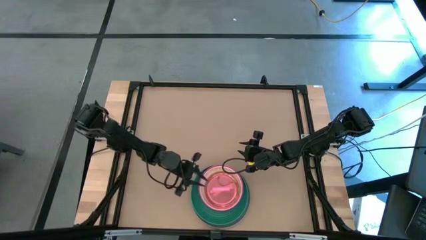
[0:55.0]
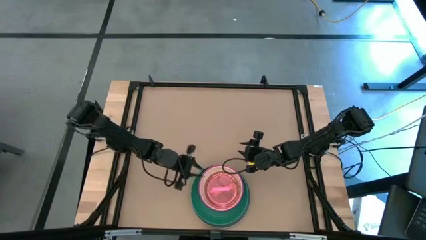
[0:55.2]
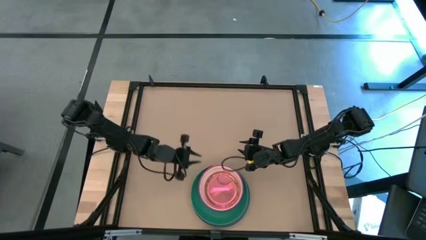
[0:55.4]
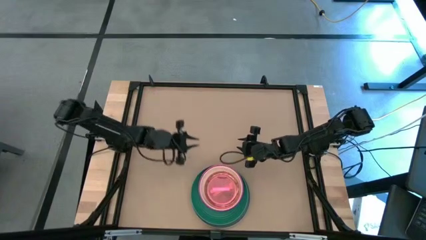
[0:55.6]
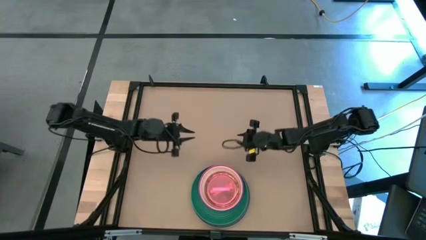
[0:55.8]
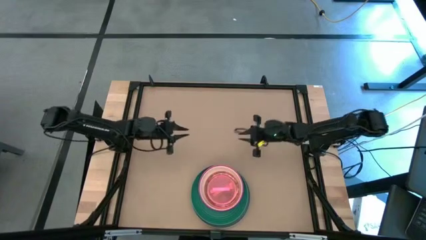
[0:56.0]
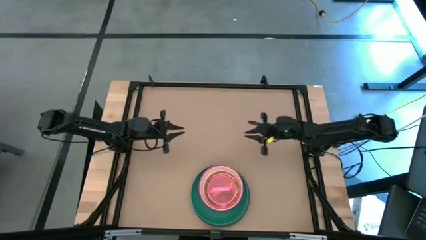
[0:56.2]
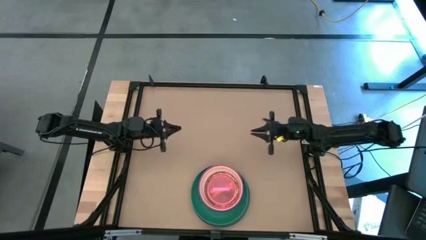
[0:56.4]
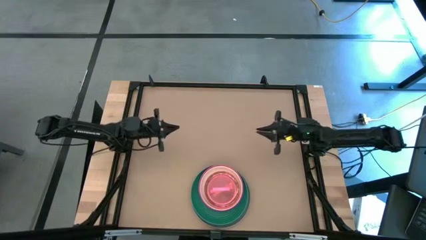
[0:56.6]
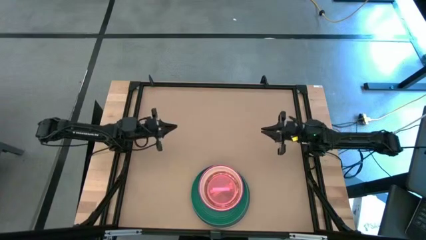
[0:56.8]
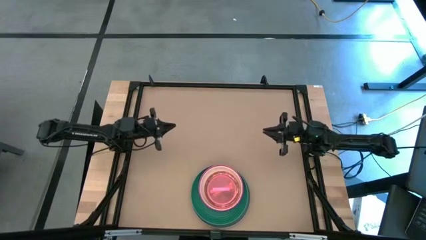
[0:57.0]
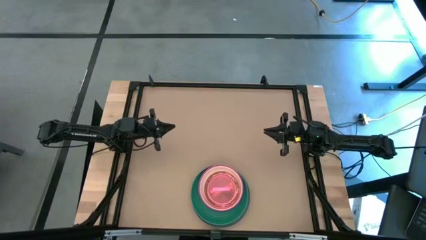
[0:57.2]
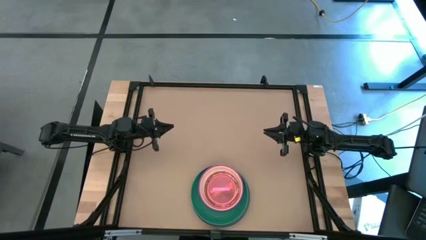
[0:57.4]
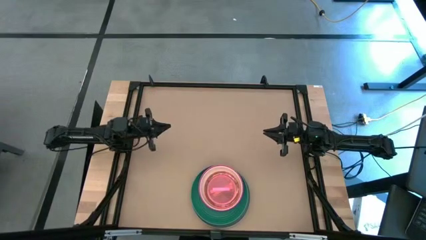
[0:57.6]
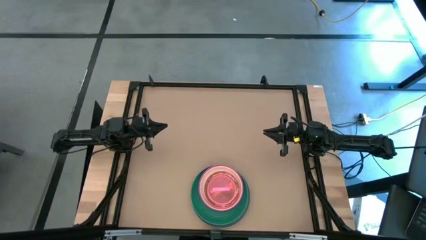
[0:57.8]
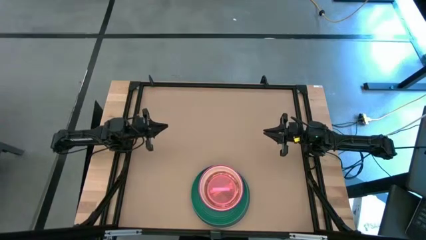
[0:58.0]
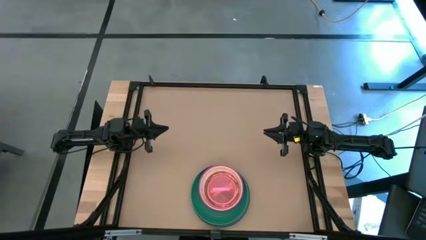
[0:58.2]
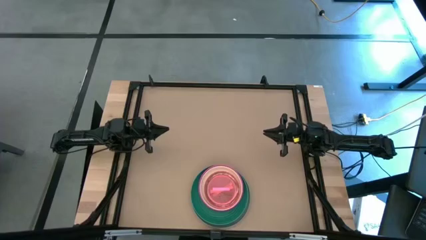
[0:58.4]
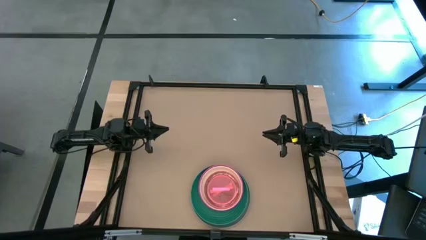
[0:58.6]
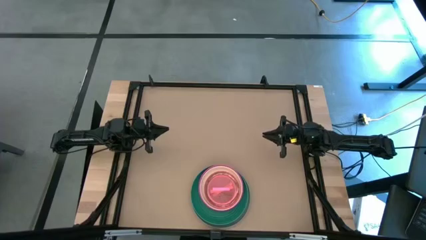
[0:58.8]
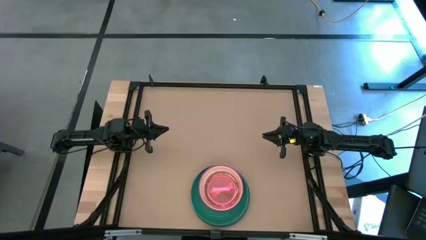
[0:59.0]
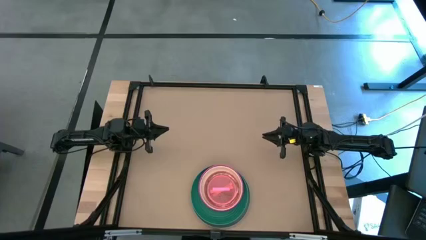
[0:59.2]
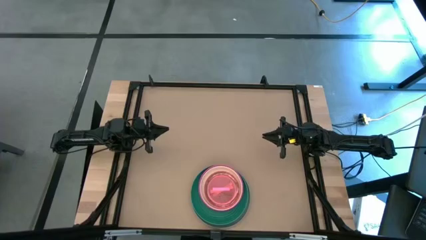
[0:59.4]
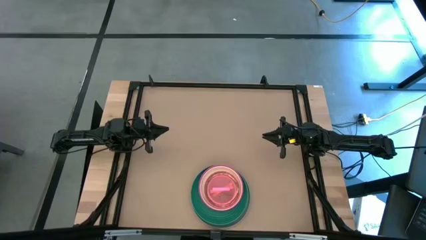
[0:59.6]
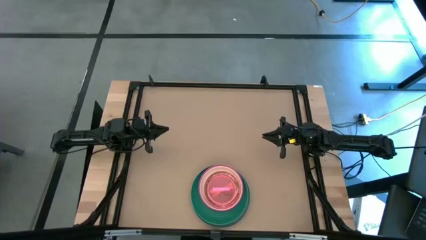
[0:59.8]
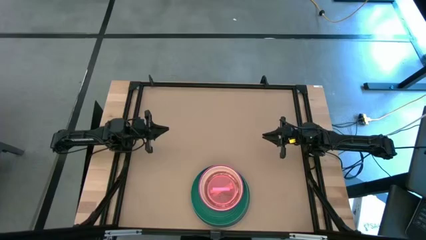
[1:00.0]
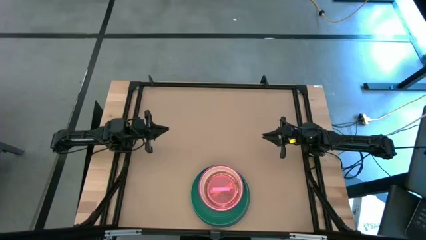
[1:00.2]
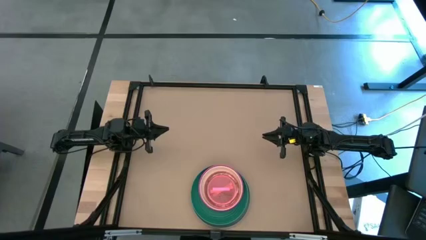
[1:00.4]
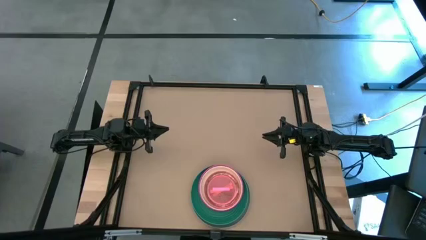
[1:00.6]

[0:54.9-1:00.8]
Task: Stack plastic plates
Return to Home Position

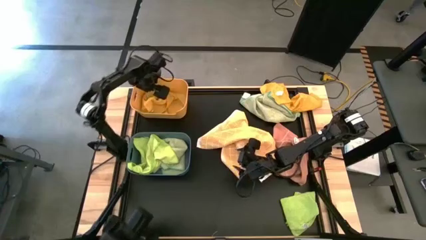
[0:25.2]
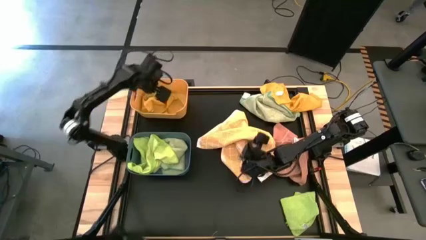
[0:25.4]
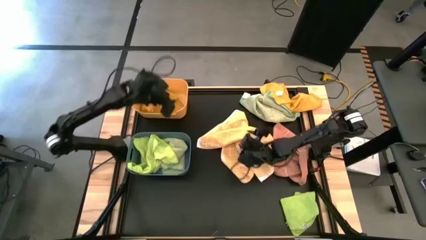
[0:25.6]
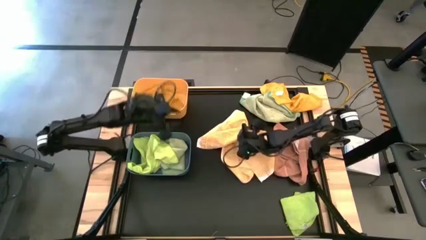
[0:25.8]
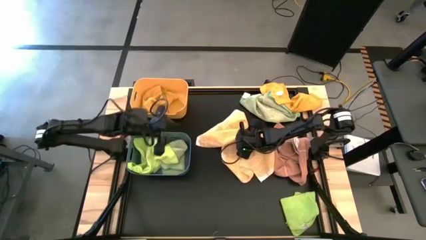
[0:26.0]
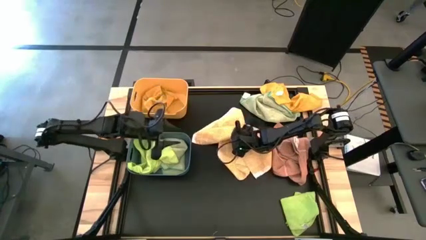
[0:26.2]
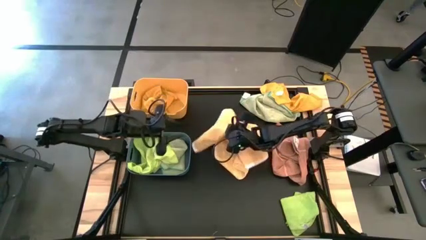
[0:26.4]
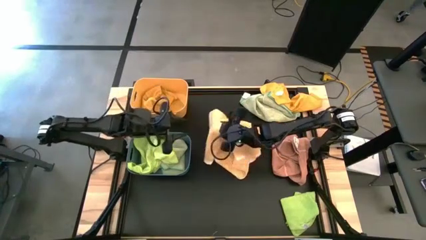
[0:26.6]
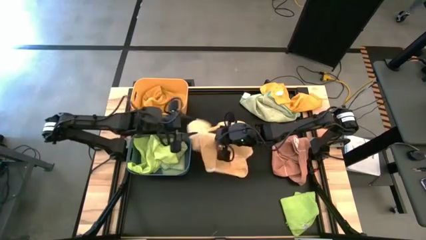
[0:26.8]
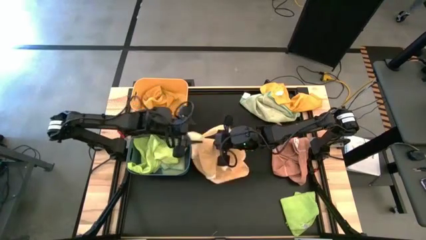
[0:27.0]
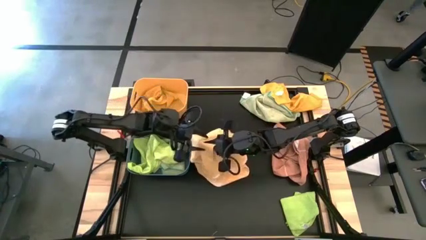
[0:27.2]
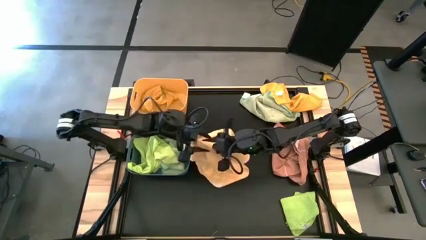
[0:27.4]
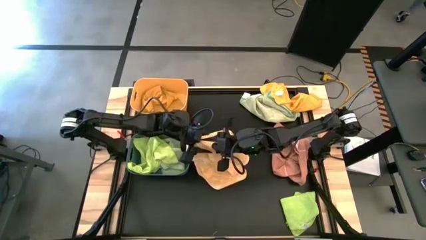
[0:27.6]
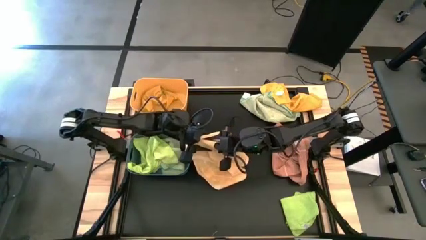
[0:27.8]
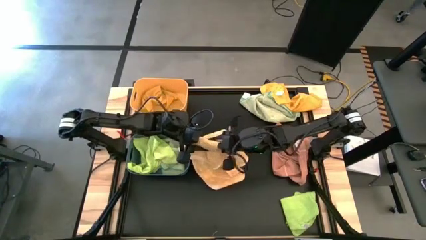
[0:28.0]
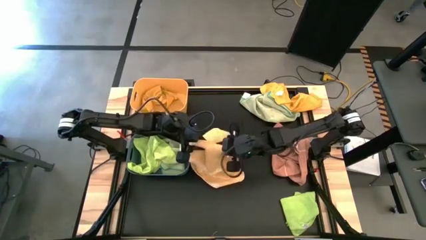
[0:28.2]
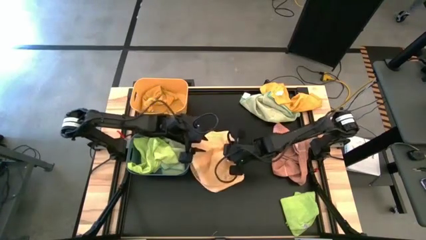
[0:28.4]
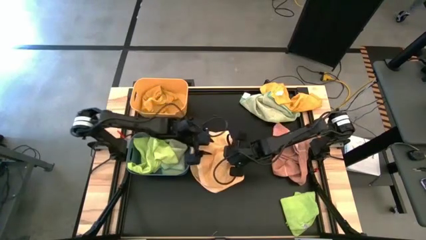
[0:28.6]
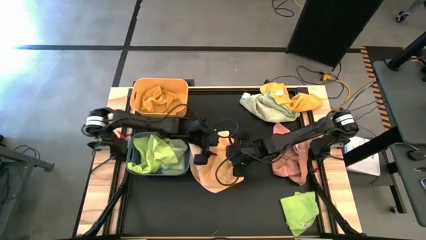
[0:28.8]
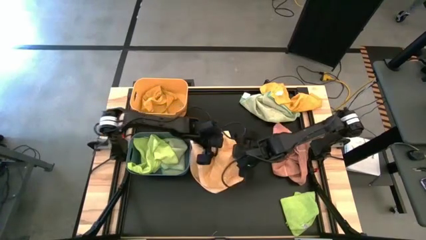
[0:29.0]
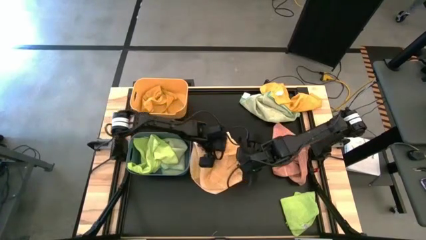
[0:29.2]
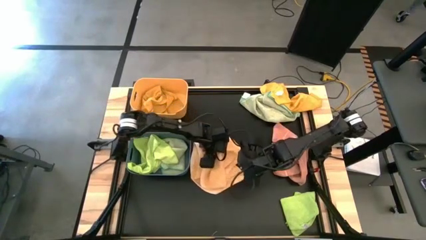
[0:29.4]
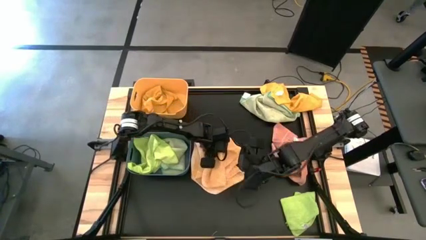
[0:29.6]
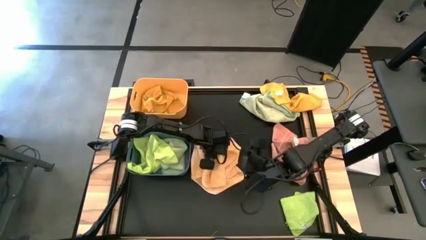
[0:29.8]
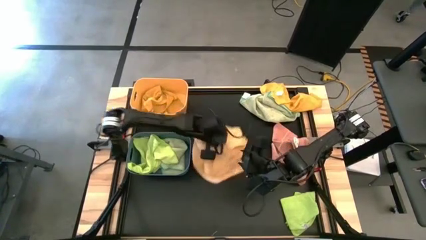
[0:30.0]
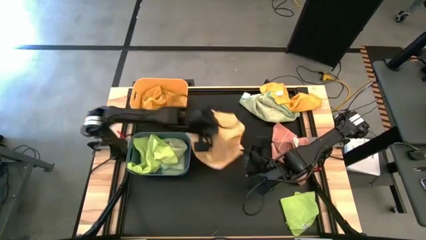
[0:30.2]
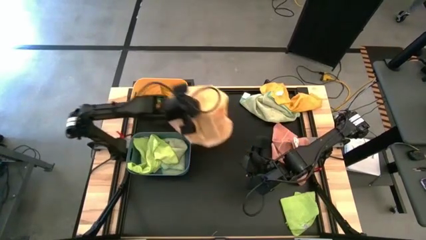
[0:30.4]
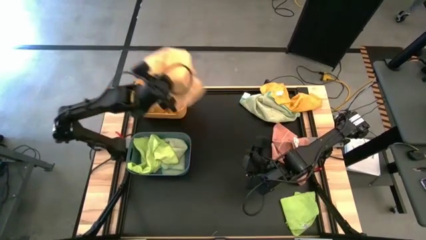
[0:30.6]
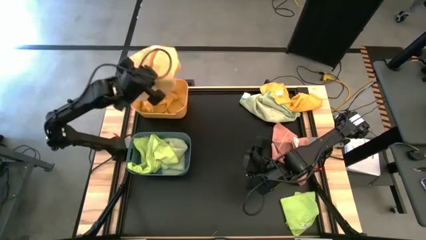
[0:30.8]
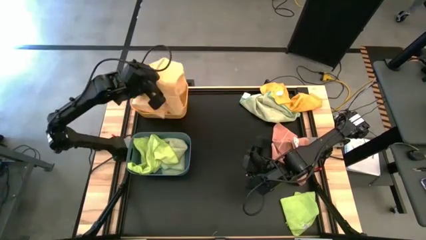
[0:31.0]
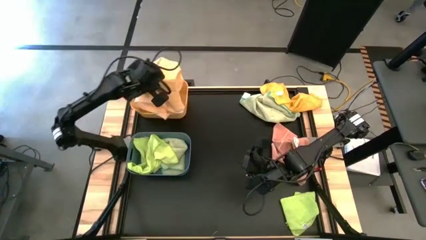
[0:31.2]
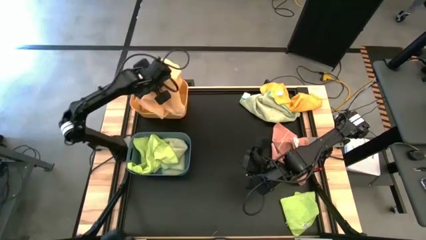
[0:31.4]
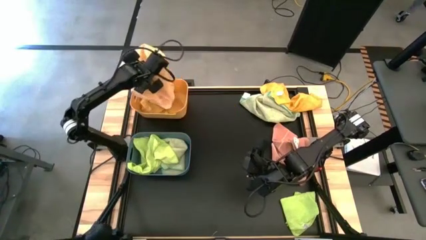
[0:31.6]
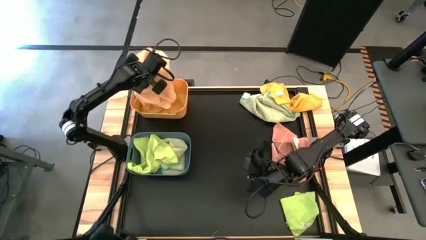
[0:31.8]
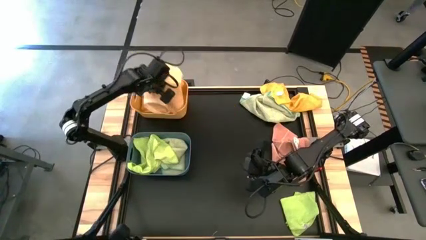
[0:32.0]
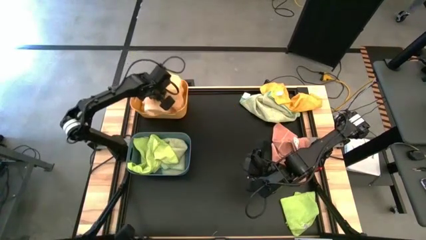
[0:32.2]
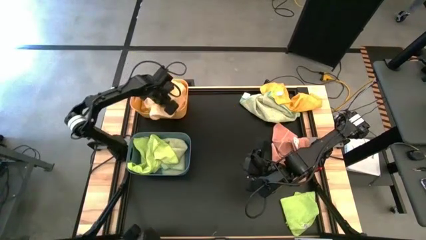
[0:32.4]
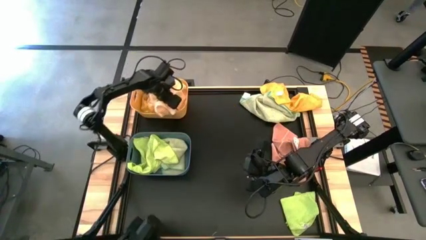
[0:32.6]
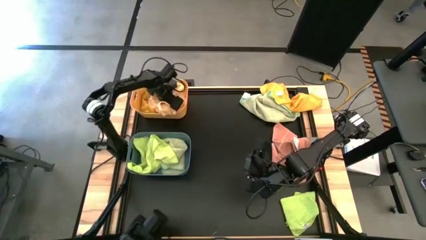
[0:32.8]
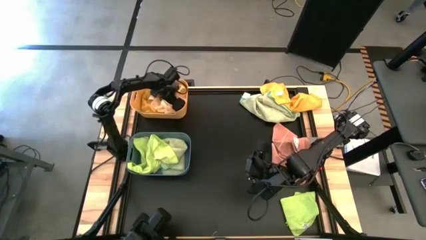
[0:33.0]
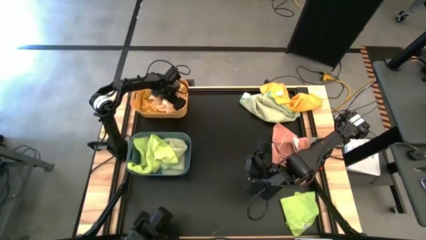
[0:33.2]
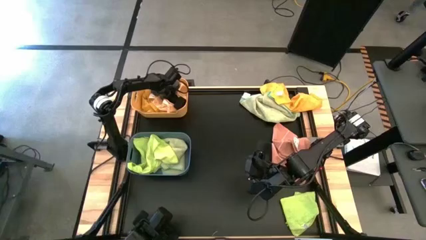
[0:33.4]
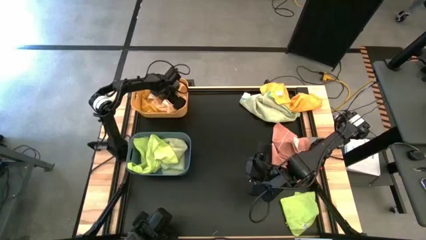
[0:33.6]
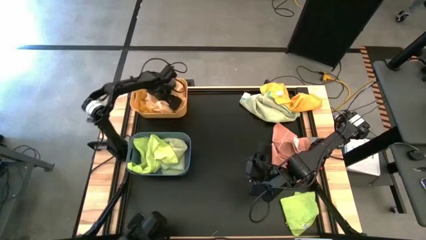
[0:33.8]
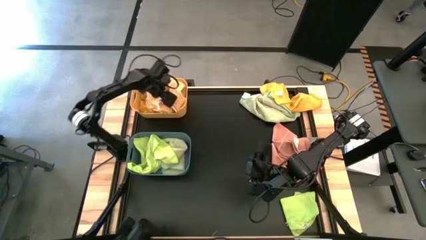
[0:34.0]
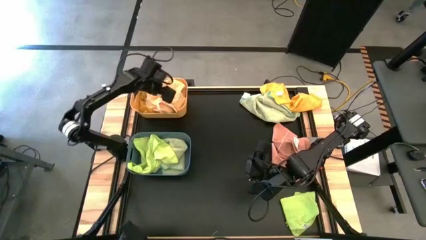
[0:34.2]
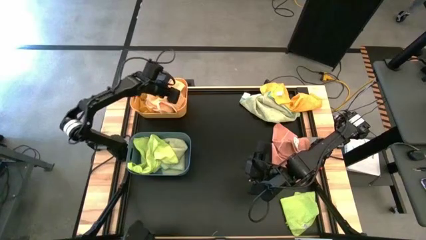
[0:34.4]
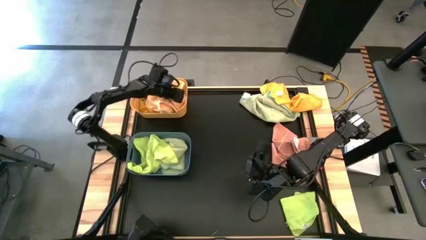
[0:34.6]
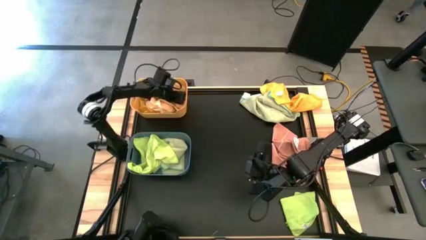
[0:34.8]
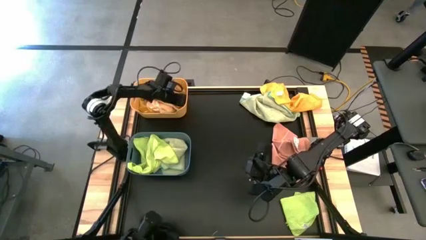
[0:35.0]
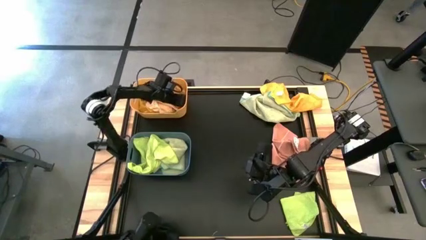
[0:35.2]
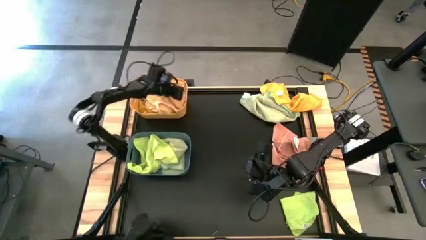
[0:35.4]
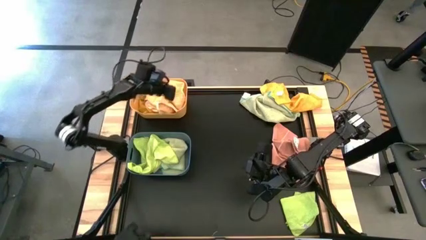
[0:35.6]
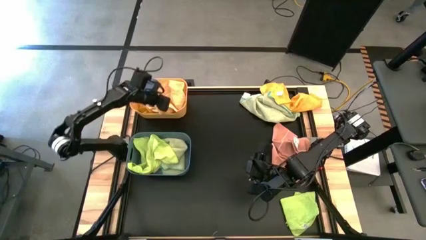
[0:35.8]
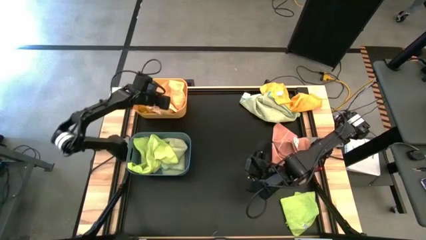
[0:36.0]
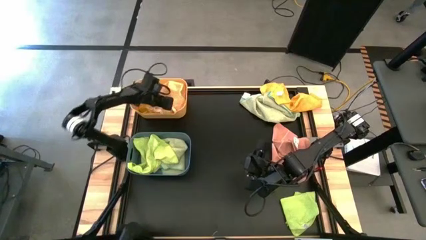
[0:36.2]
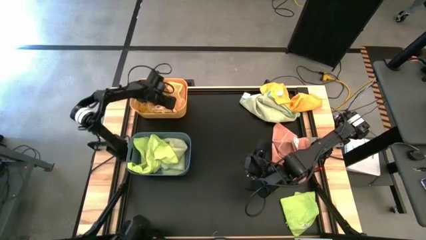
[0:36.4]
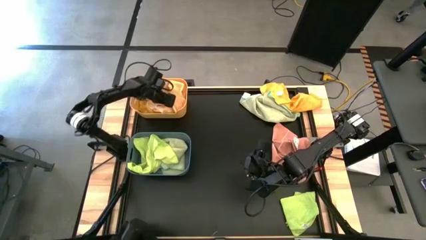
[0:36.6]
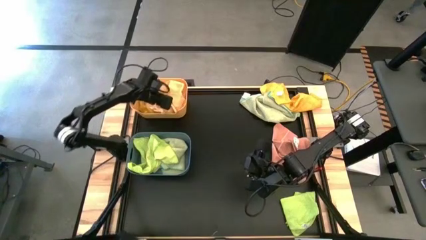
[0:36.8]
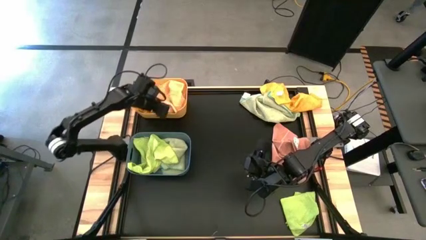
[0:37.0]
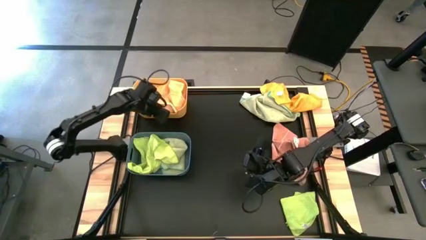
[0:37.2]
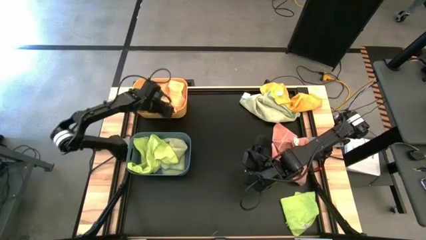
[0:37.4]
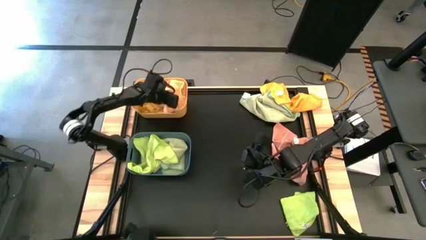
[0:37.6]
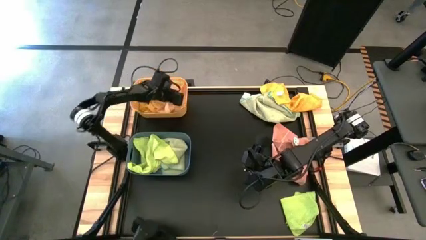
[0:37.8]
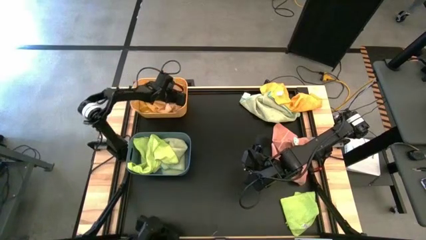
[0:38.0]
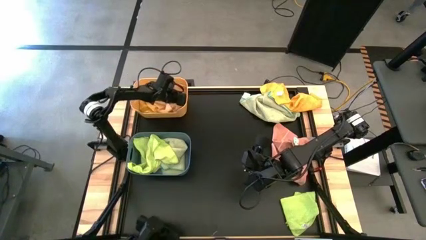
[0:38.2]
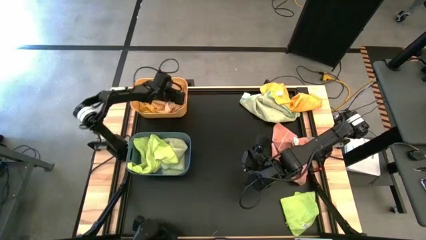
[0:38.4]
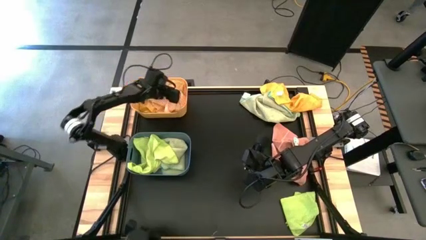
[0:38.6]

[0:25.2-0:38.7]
Task: Sort microfiber towel by color & place in baskets
Put the orange towel into the yellow bin
